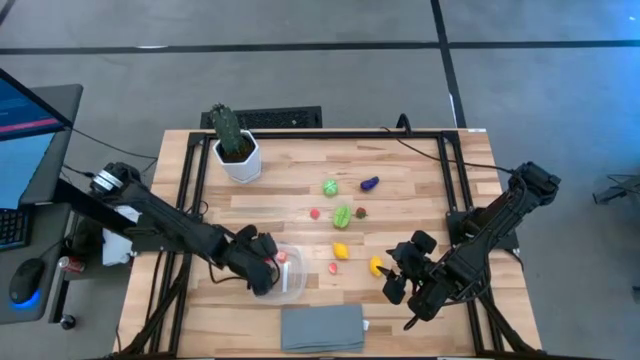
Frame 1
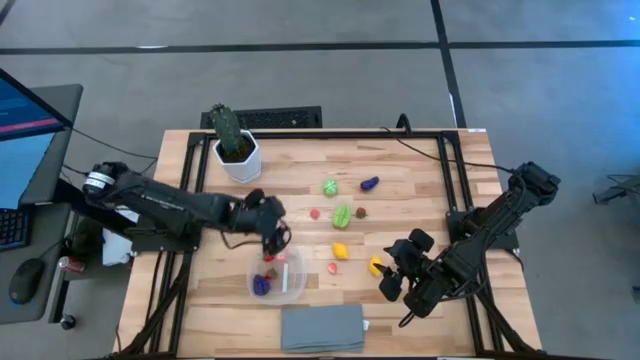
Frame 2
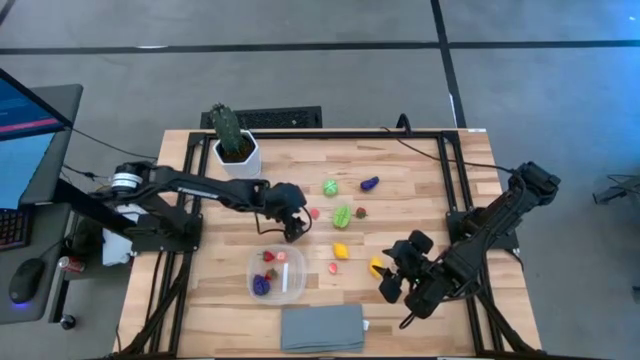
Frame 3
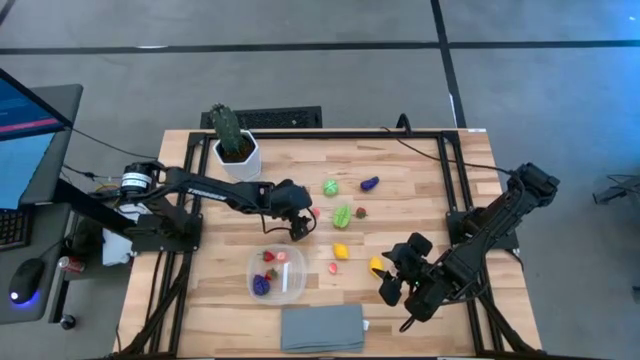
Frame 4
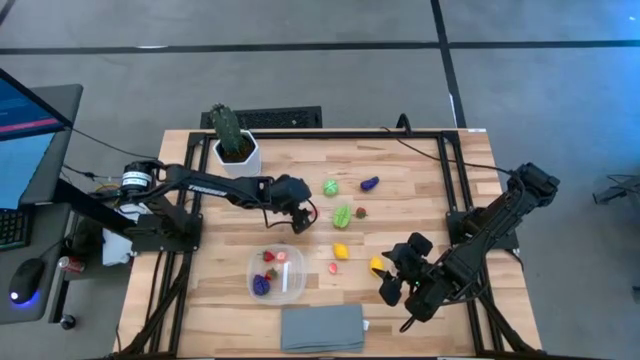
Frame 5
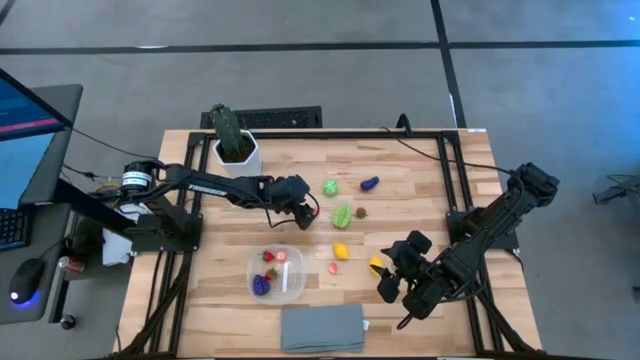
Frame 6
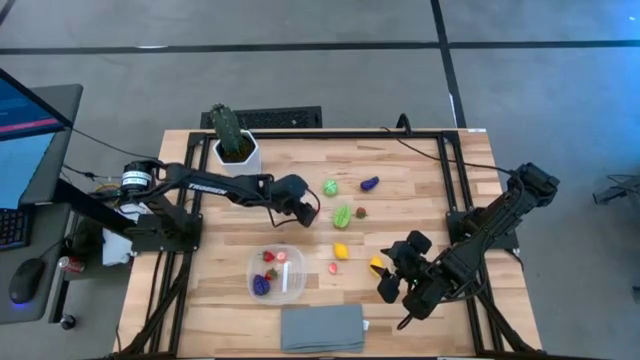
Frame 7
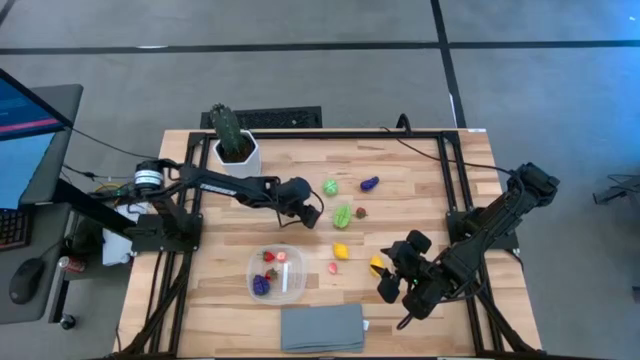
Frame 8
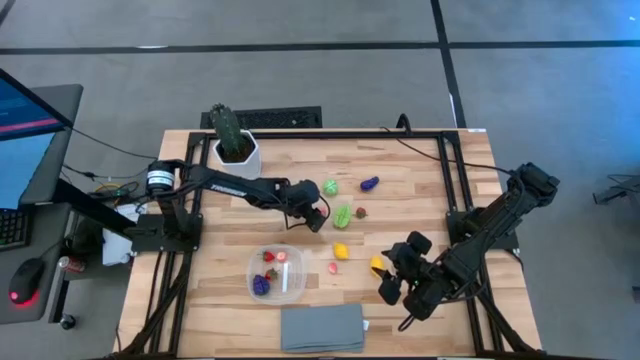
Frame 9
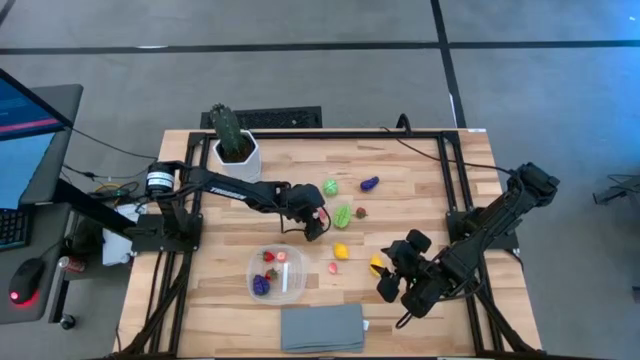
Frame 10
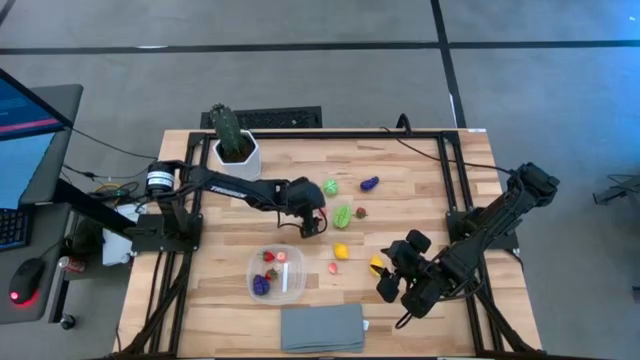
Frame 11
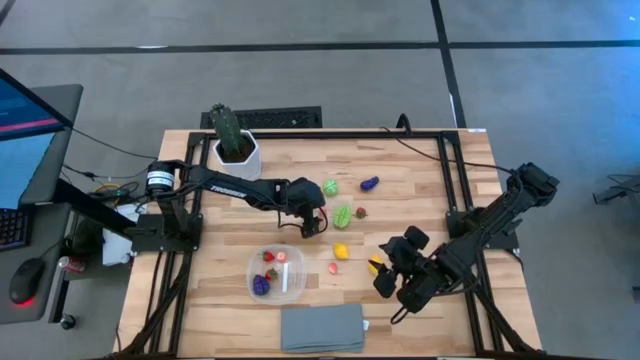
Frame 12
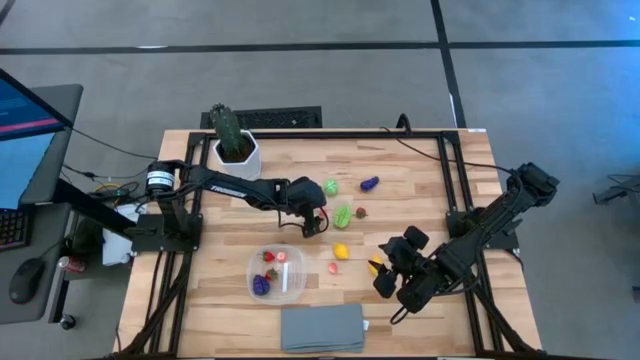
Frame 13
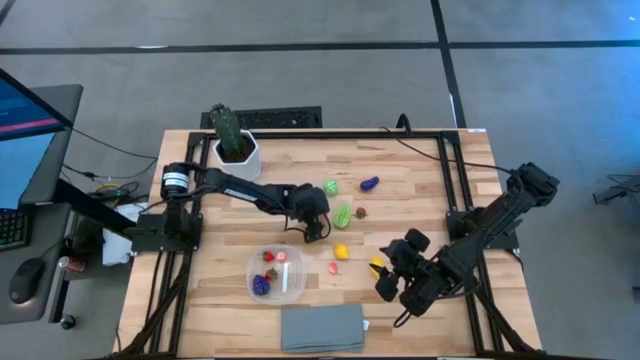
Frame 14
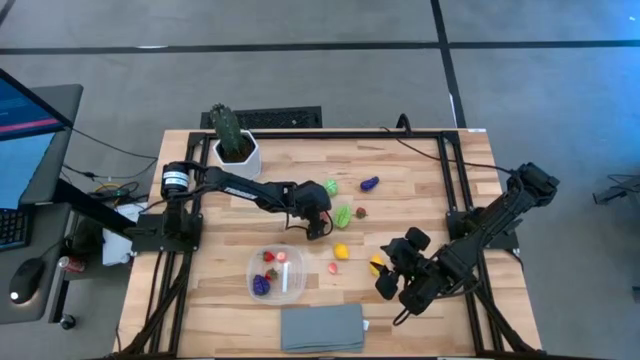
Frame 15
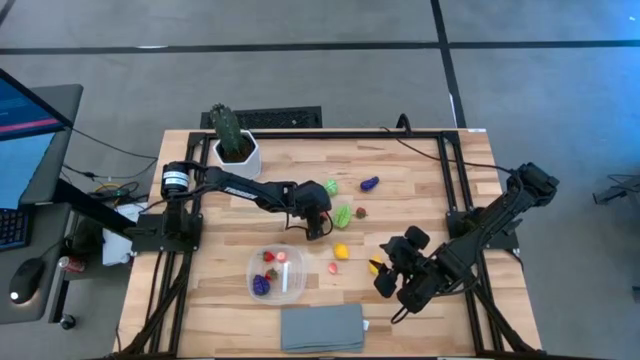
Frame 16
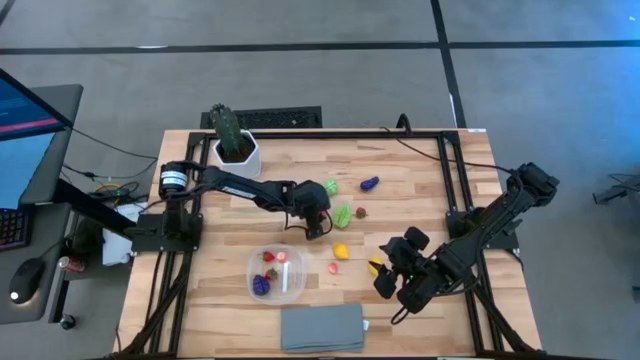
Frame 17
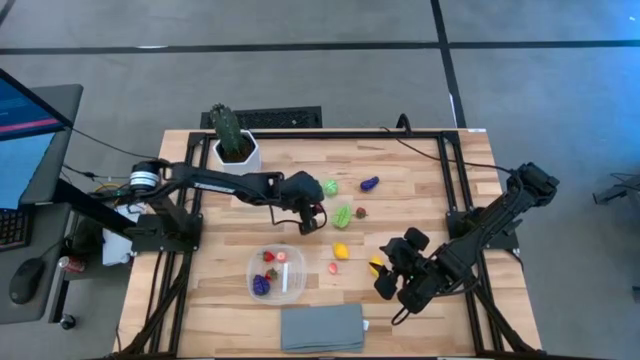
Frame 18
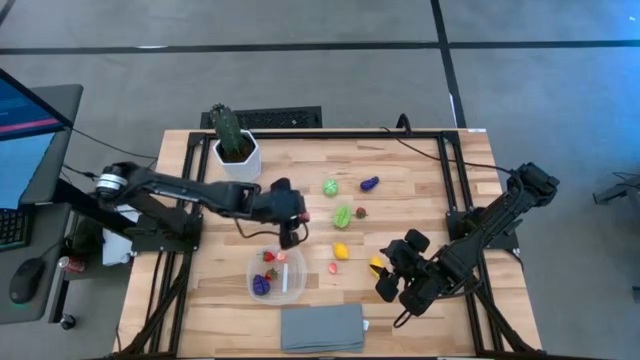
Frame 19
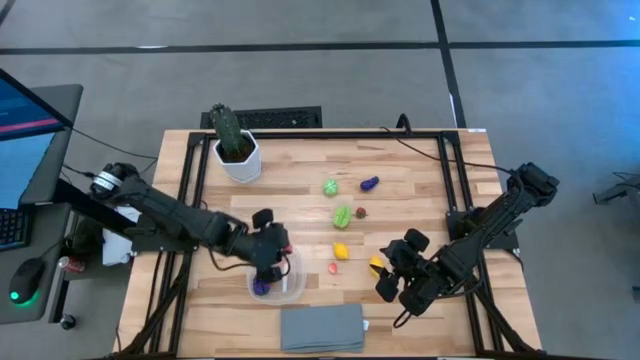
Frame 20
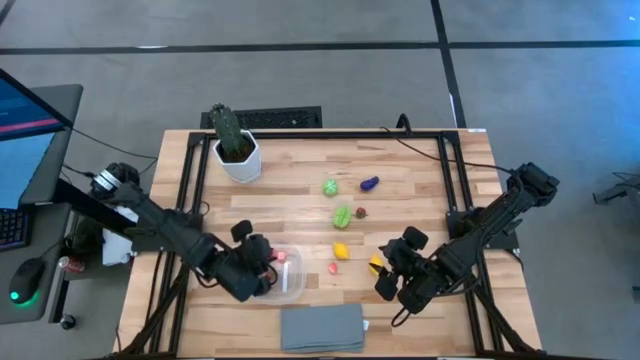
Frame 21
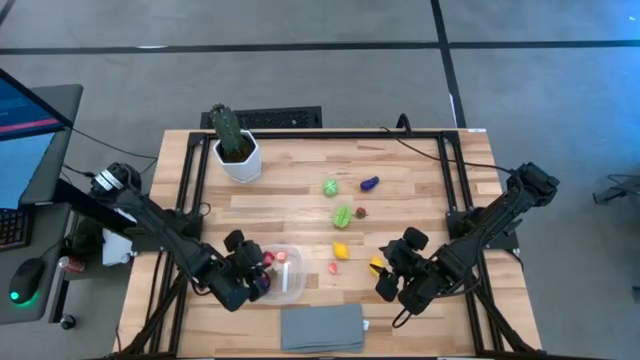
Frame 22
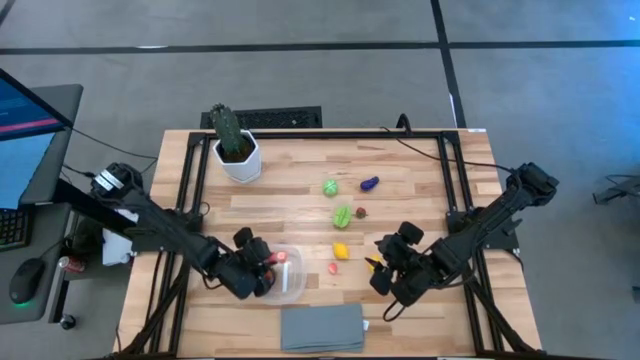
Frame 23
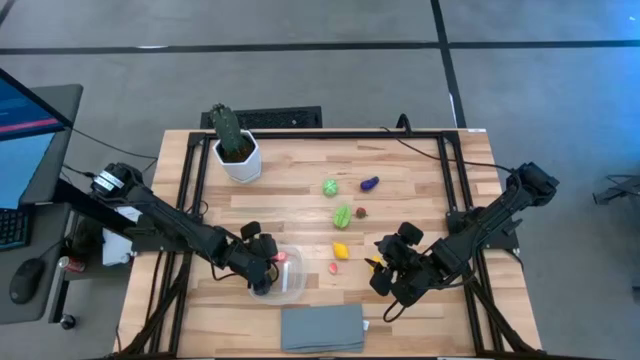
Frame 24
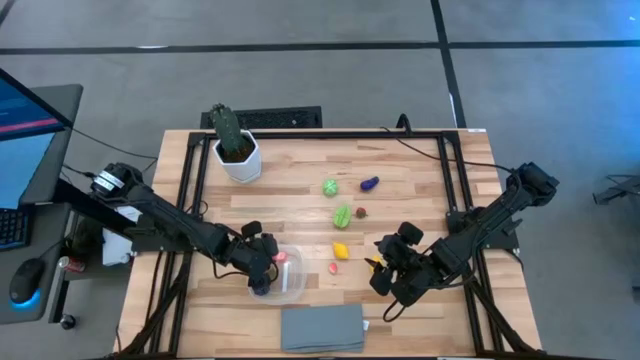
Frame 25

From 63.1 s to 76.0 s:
Task: Pick and placing Produce into tupperware
Put the top peach into the transparent bin

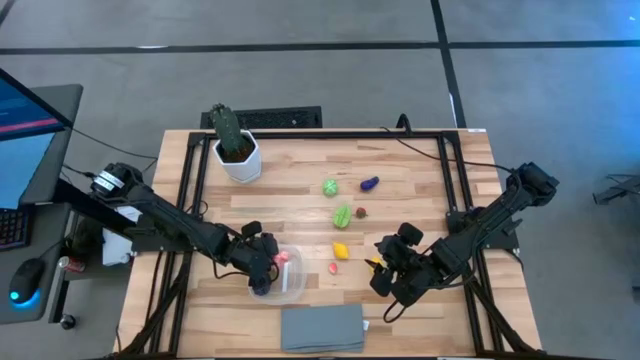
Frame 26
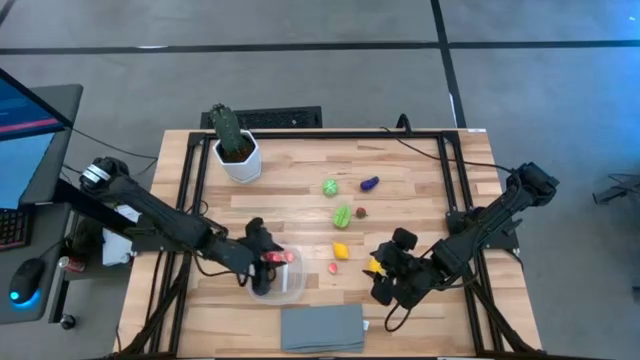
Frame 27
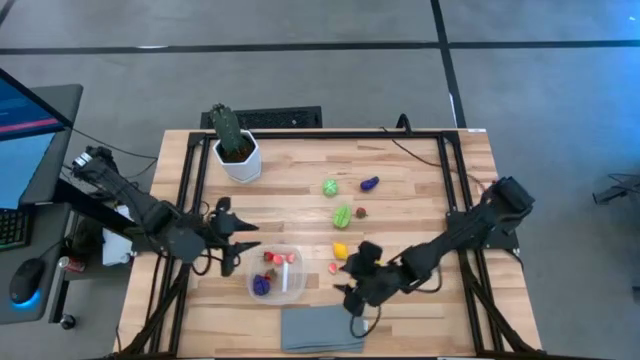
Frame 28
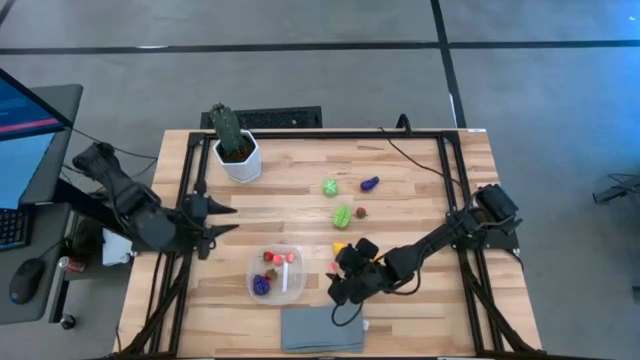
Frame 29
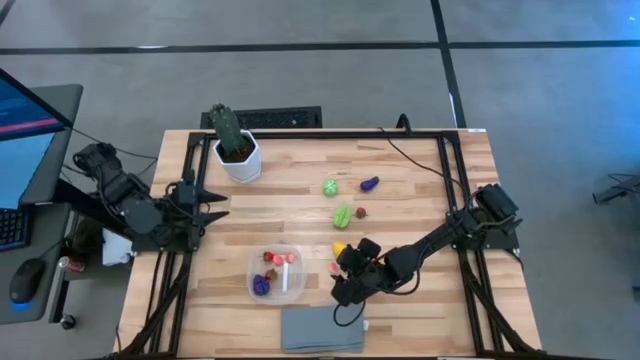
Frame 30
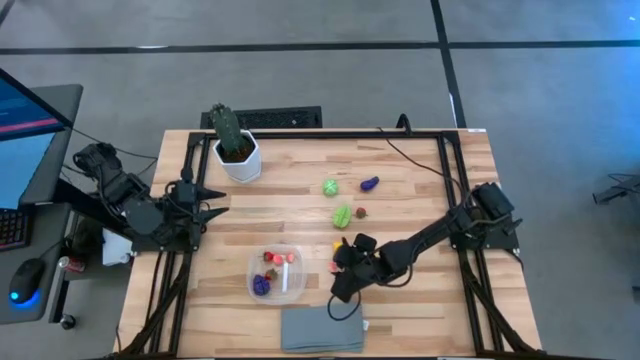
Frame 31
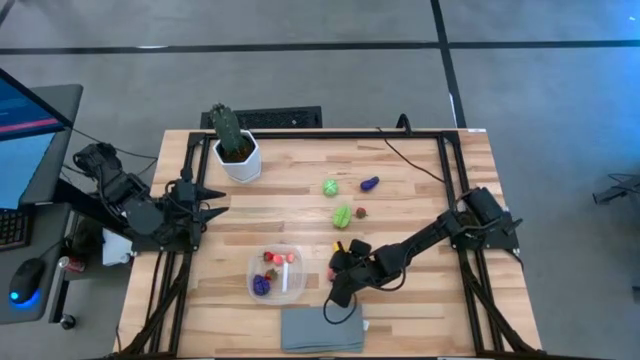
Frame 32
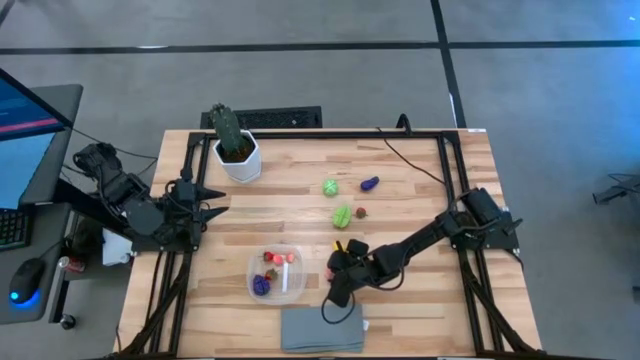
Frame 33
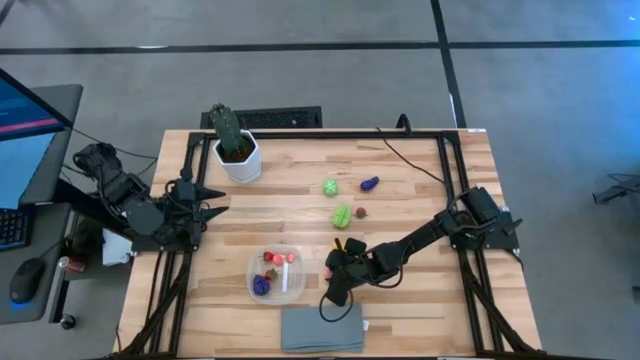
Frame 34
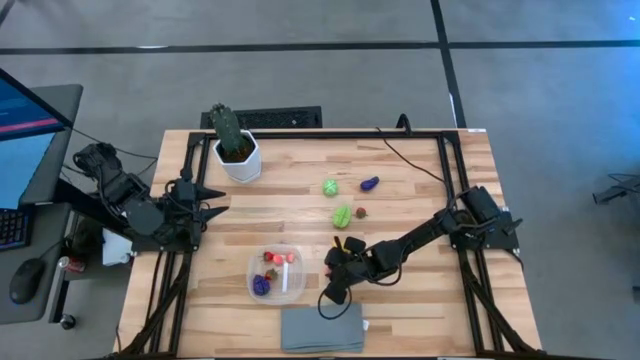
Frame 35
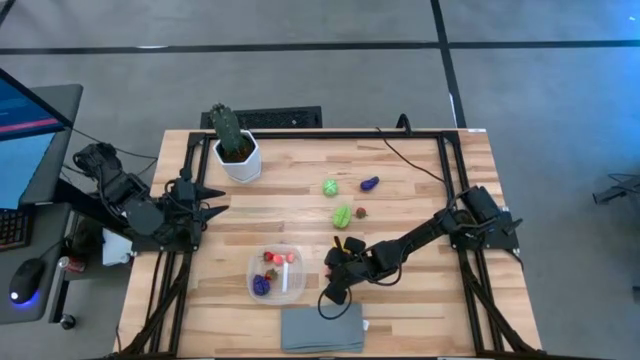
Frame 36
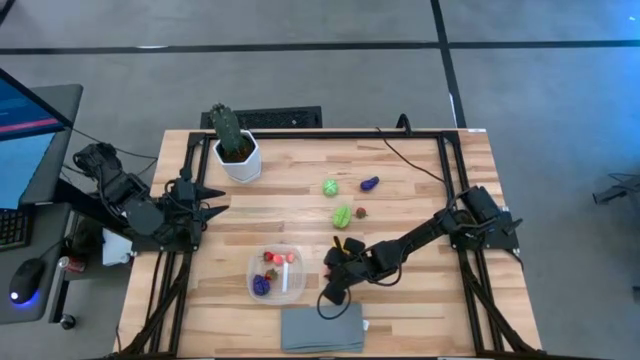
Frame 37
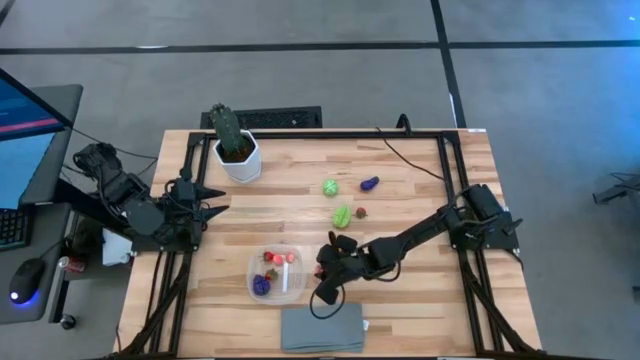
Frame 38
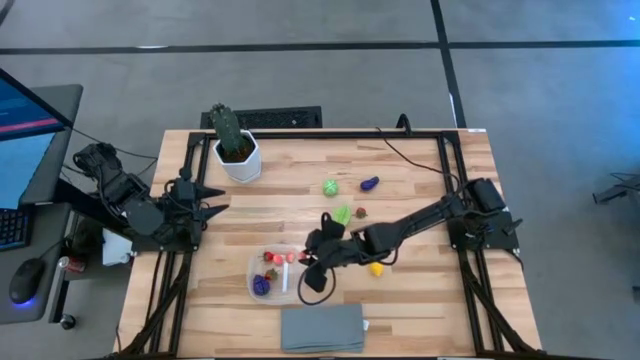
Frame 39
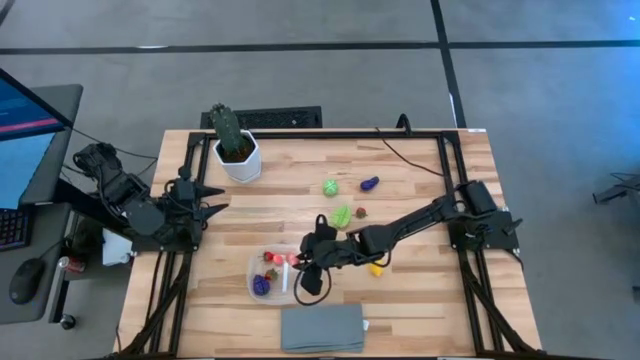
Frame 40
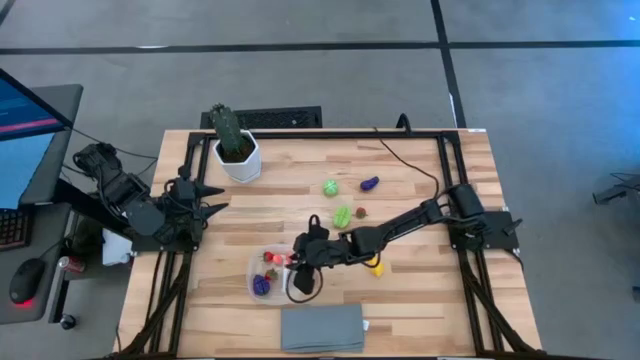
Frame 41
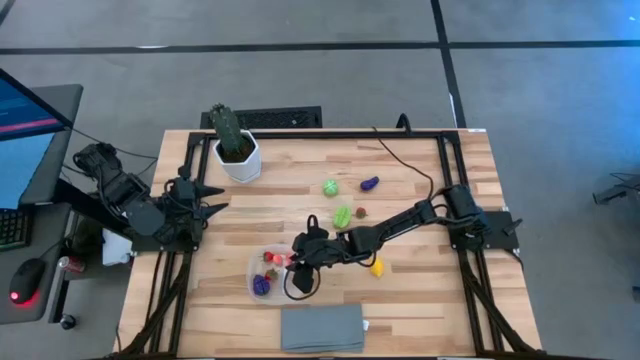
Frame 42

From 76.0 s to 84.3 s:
Put the peach into the transparent bin
